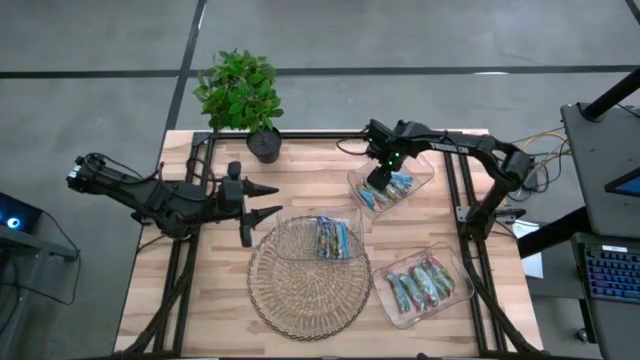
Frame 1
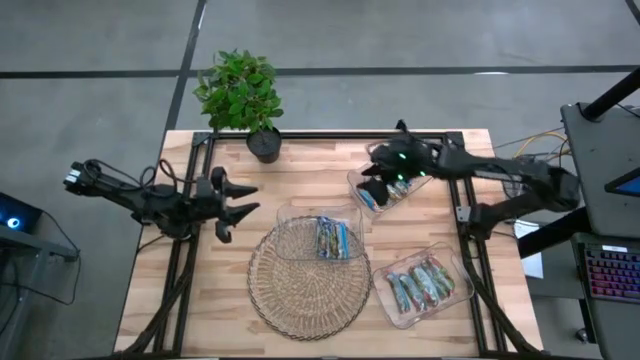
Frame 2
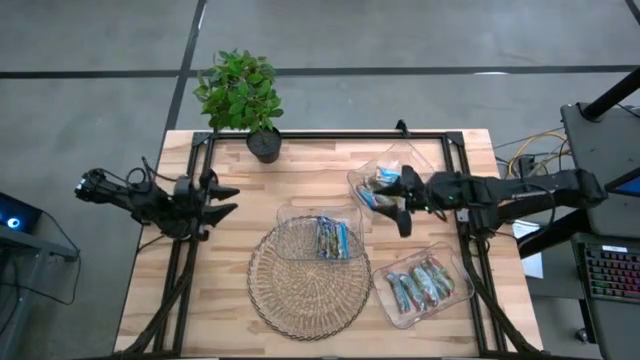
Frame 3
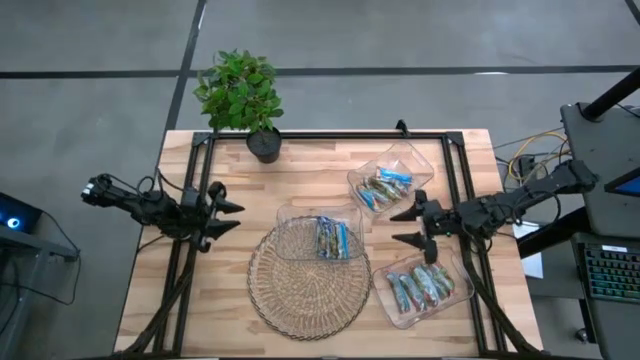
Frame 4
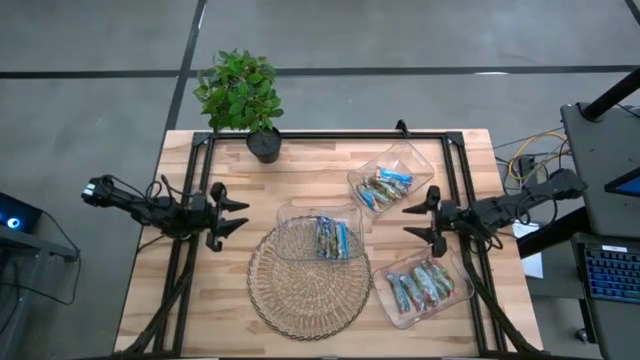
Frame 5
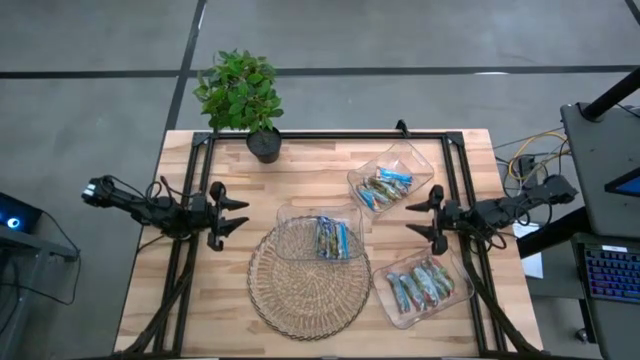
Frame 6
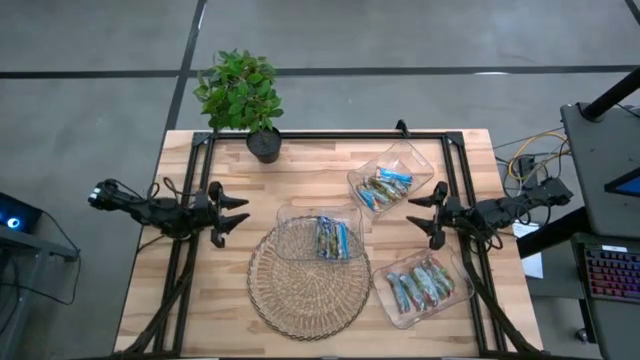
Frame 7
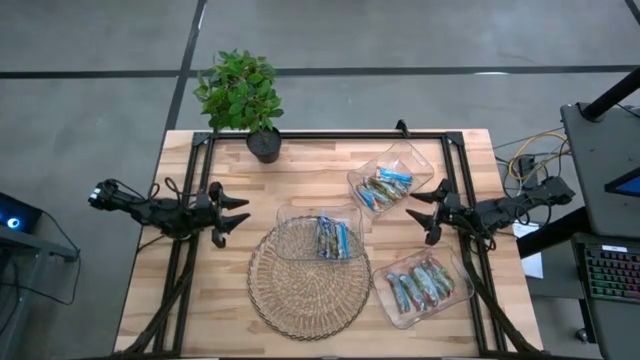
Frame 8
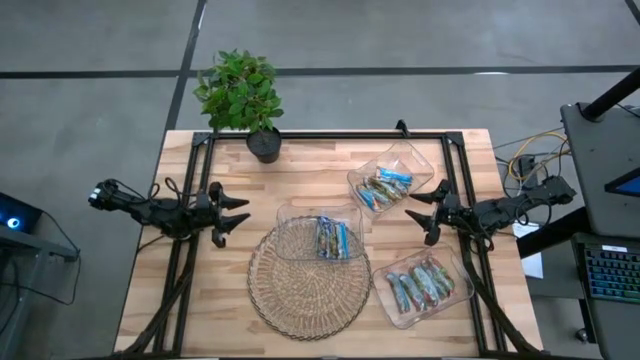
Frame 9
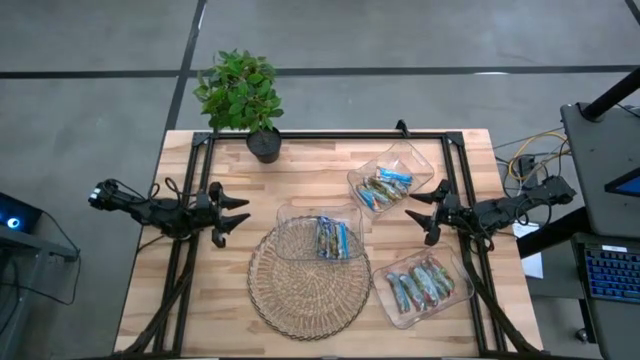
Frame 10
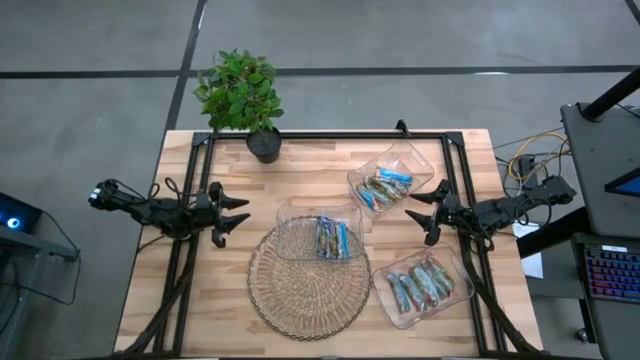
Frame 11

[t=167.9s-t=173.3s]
Task: Pick and place Granola Bars by type
Return to Home Position

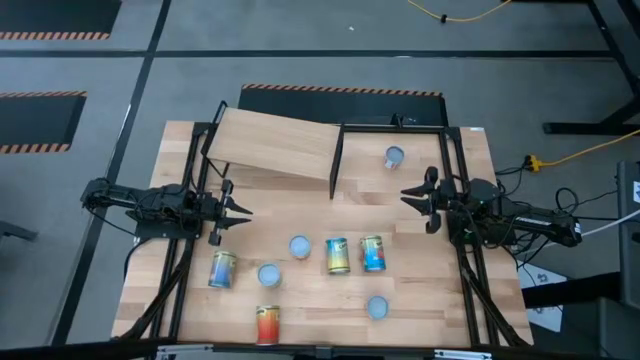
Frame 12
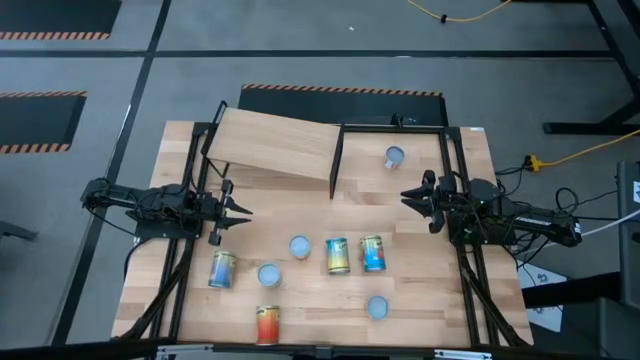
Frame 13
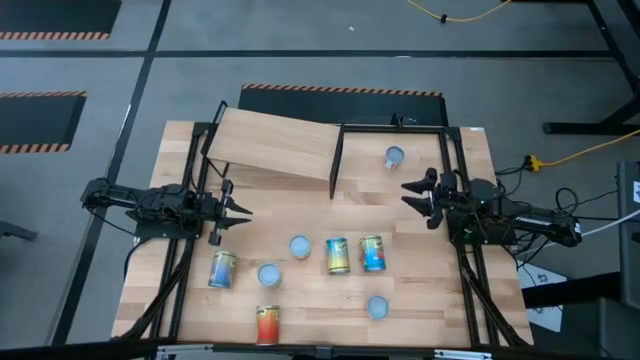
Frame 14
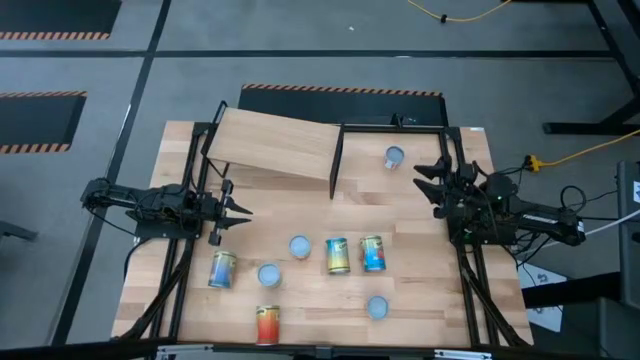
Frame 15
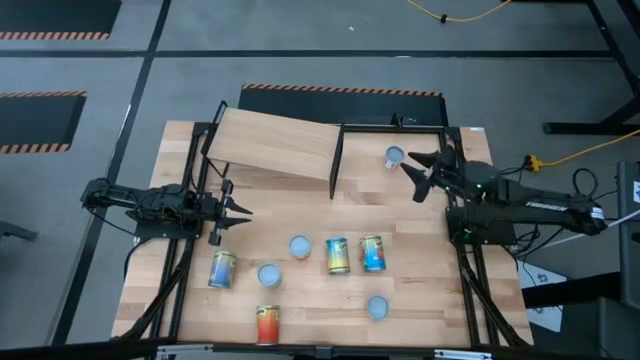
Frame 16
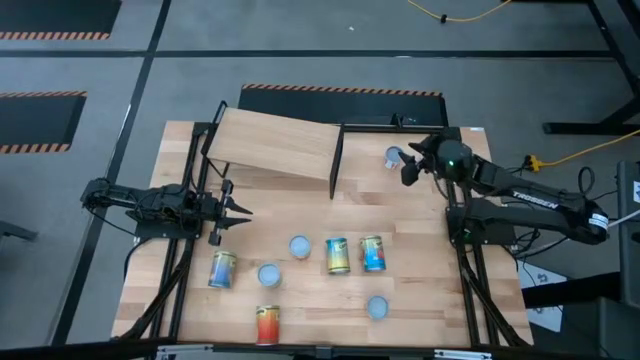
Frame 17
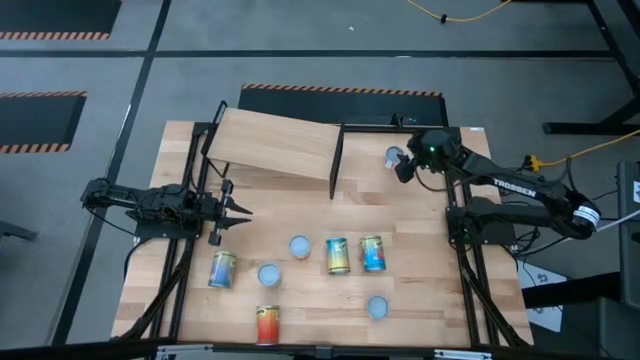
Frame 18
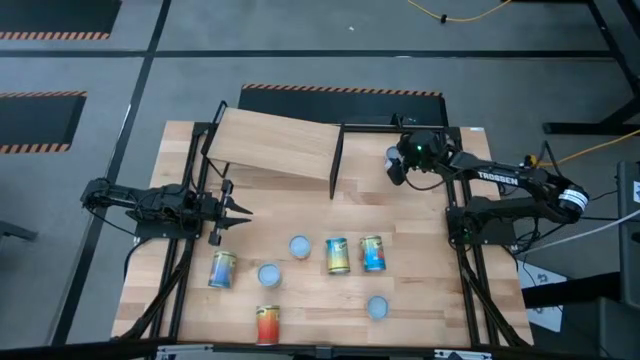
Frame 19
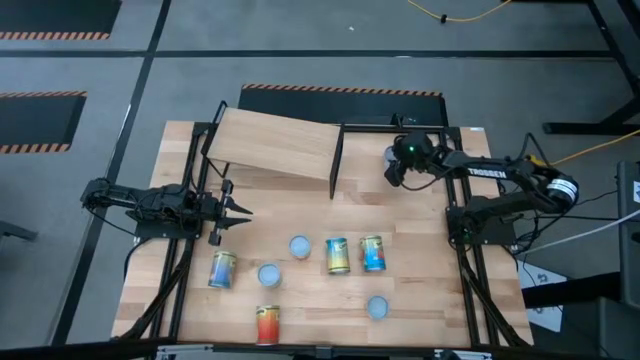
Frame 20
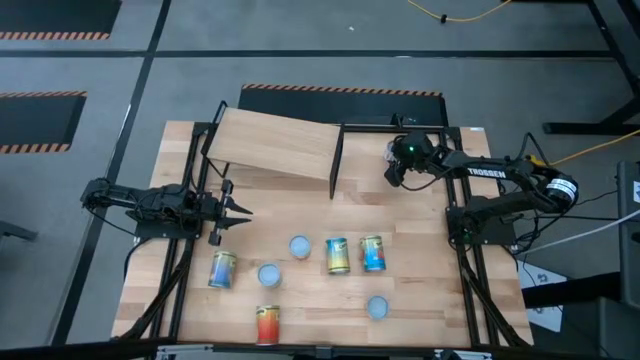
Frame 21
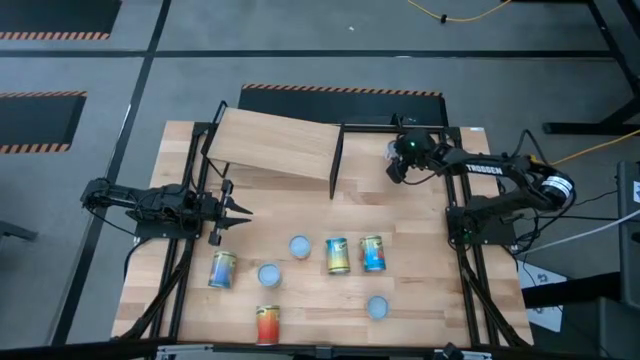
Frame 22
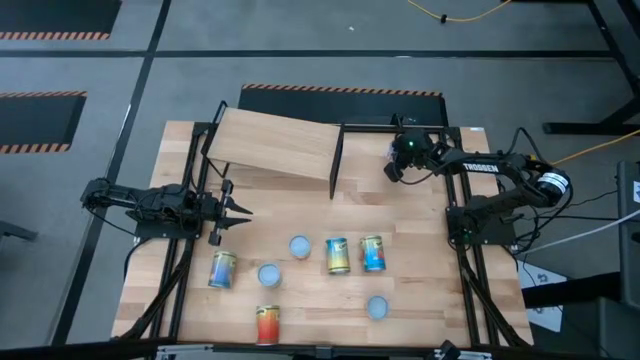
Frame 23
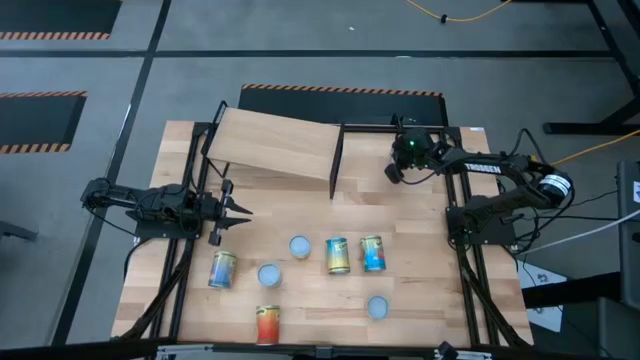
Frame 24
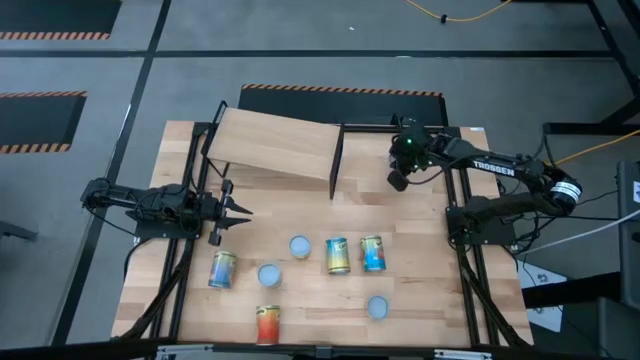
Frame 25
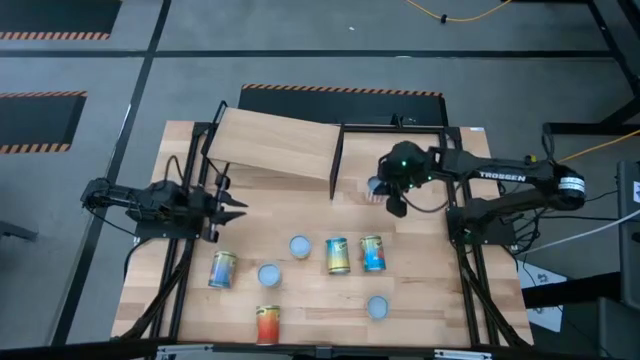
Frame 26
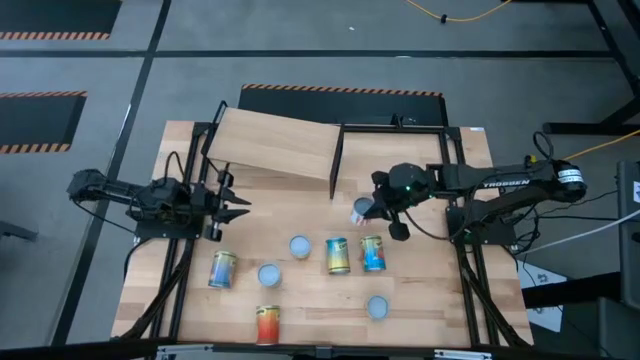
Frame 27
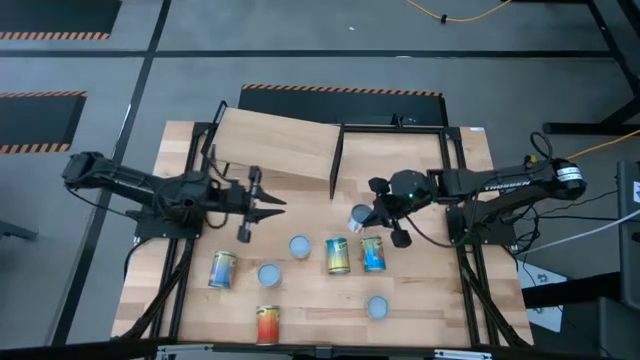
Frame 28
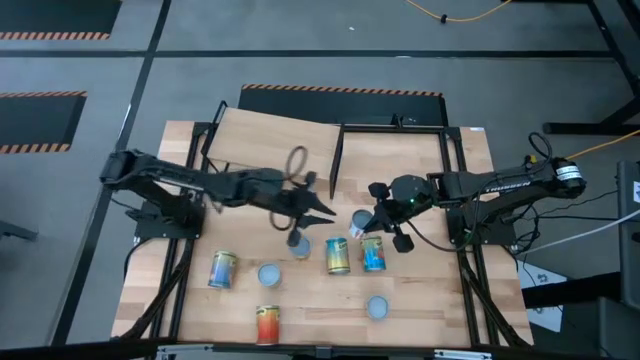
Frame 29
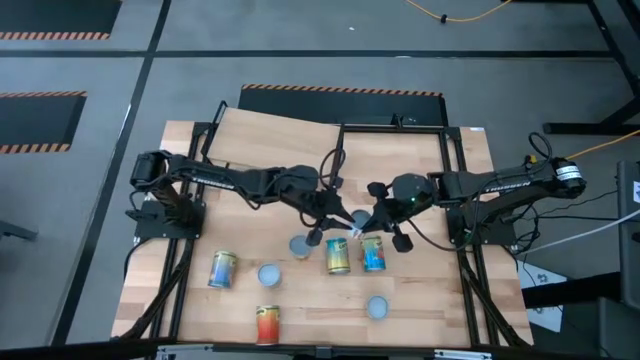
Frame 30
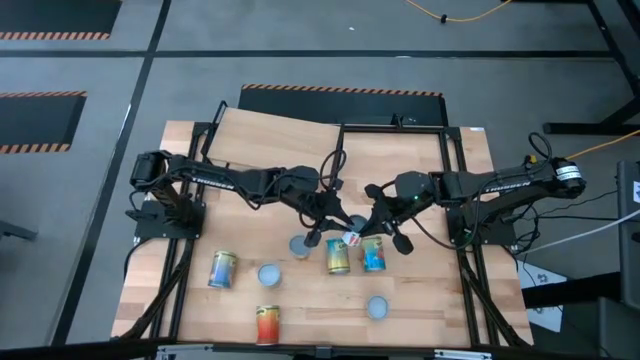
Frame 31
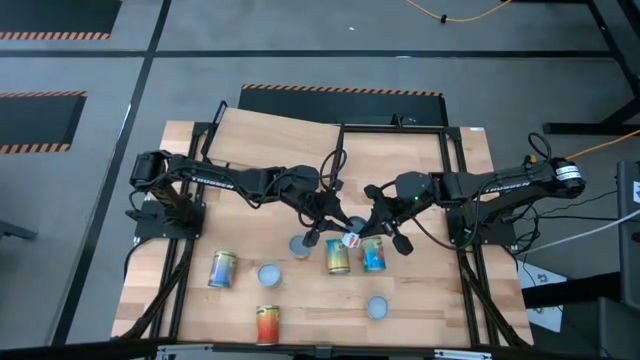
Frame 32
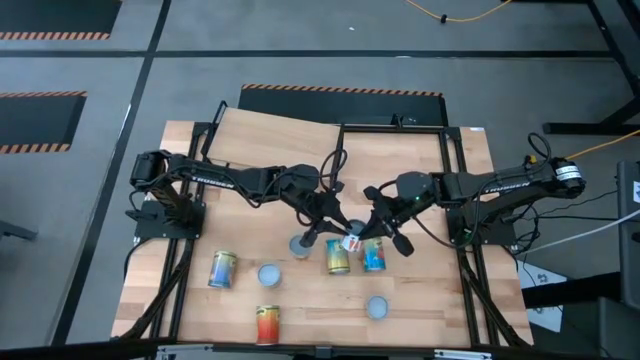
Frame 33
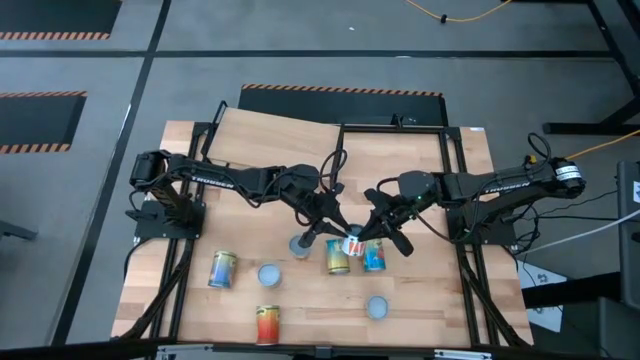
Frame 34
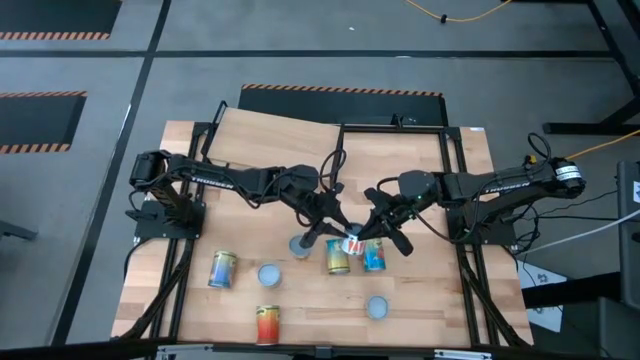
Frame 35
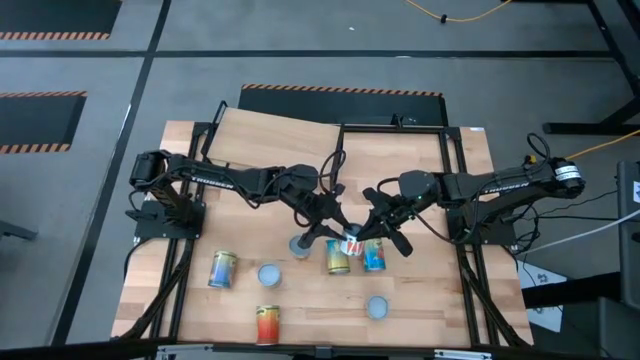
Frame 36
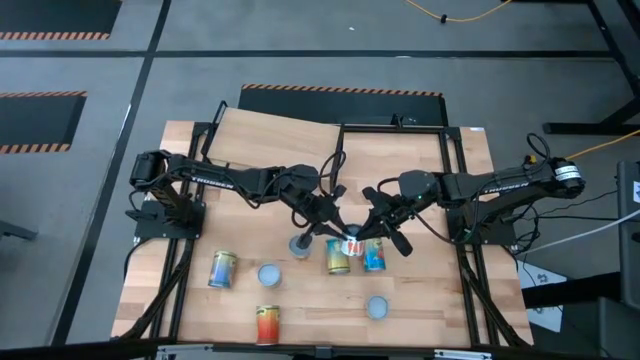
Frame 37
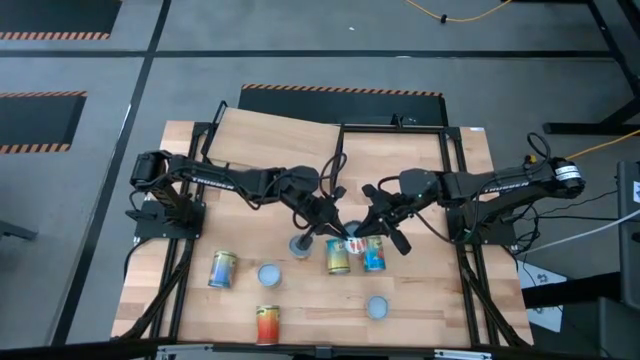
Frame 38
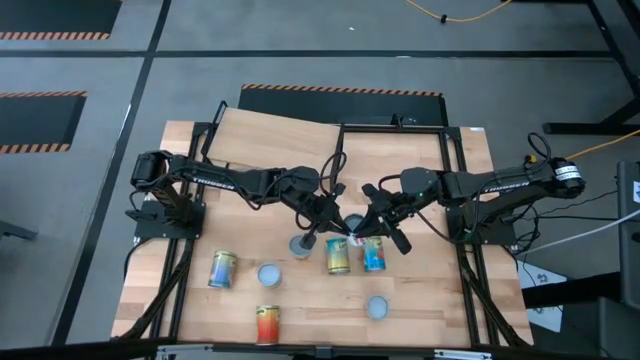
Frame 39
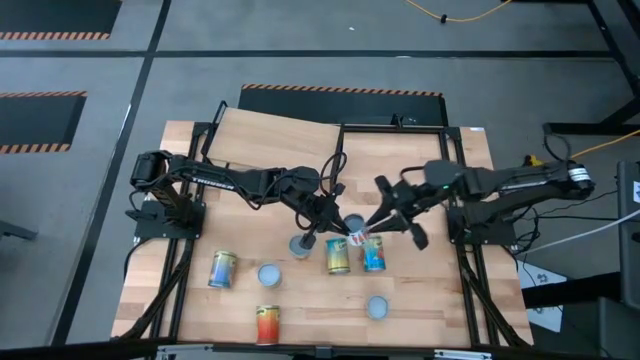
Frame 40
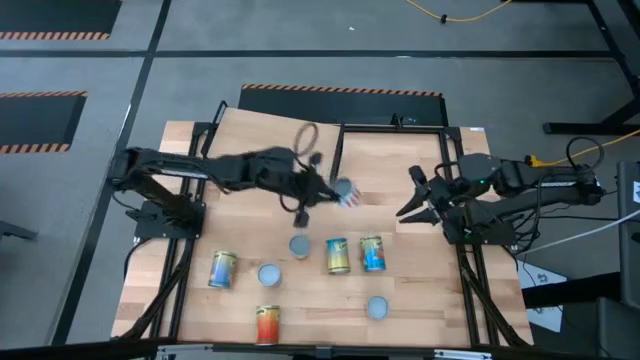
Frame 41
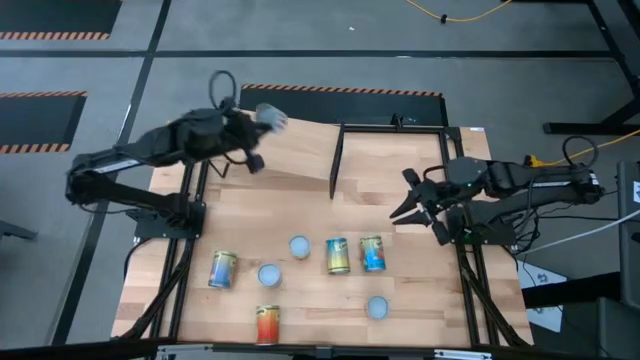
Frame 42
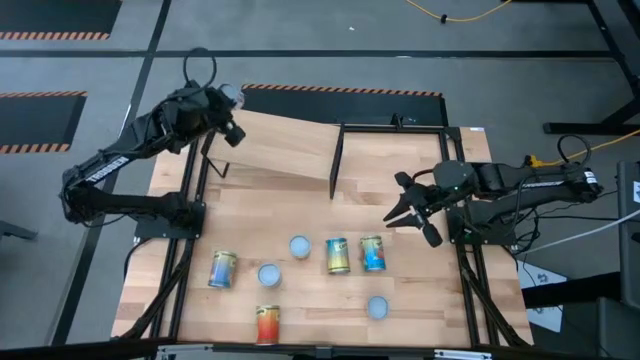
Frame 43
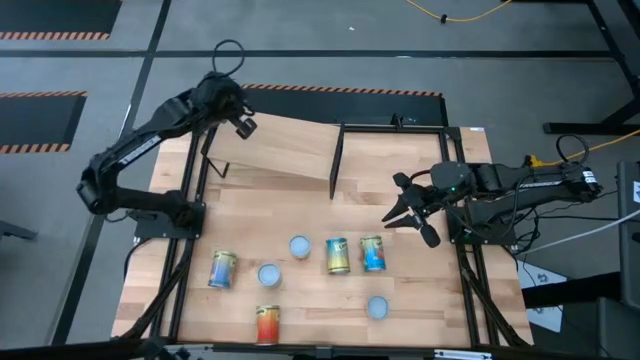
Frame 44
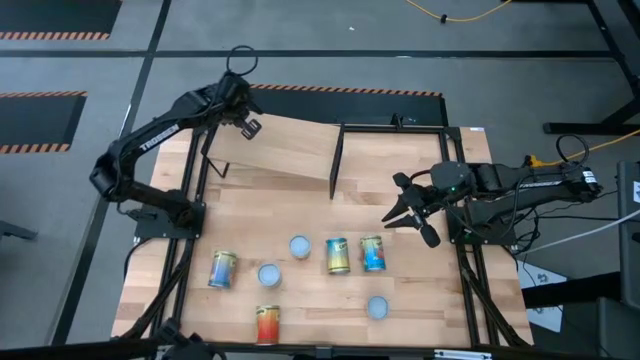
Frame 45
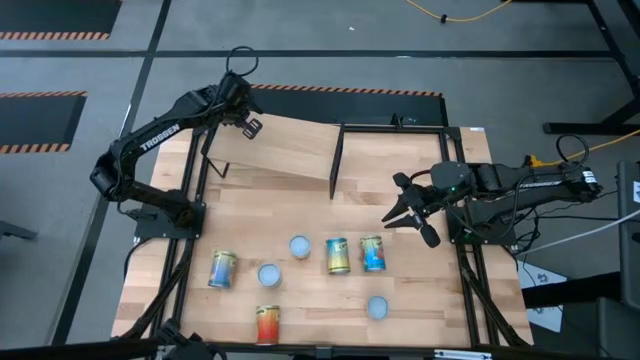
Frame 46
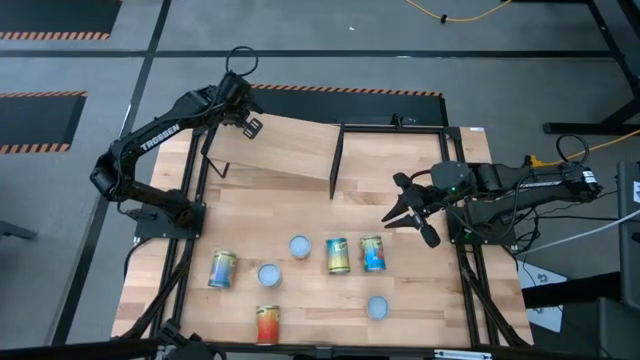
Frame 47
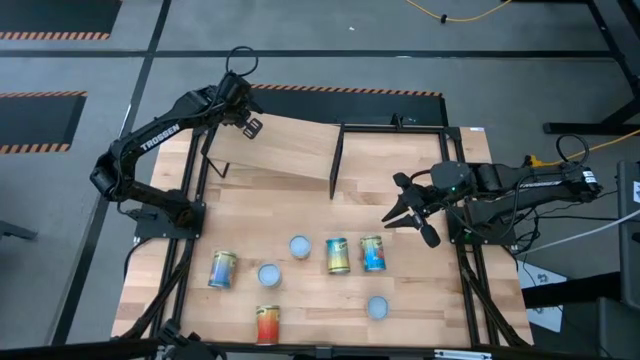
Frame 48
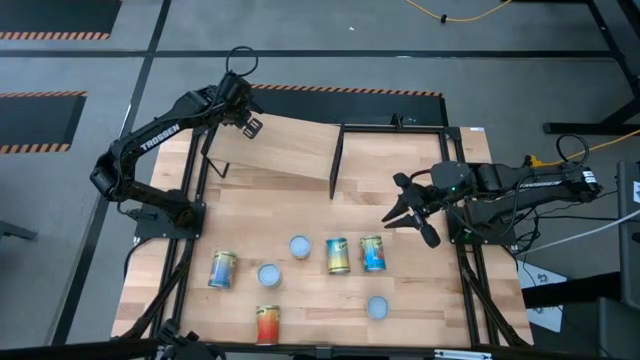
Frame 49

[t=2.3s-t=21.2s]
Task: Pick and place cans onto a shelf
Put the white canned carrot on the shelf
